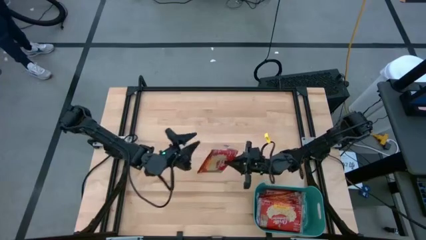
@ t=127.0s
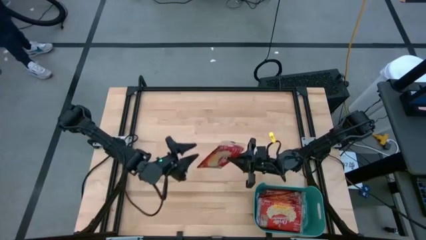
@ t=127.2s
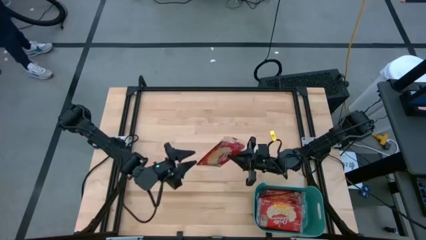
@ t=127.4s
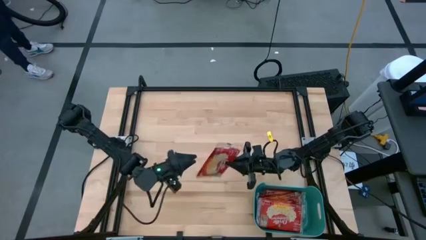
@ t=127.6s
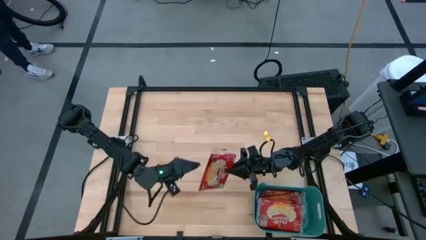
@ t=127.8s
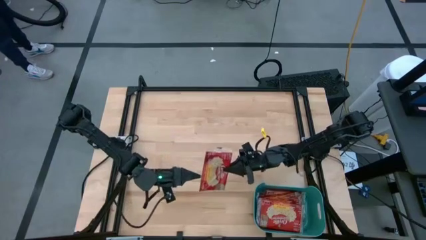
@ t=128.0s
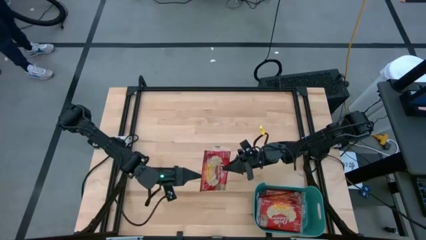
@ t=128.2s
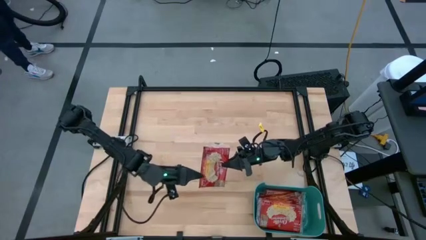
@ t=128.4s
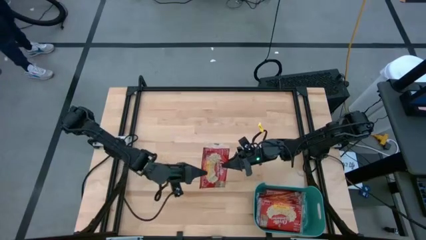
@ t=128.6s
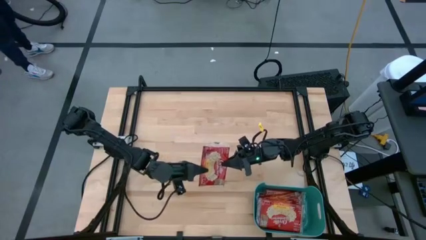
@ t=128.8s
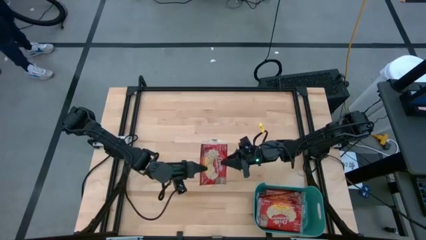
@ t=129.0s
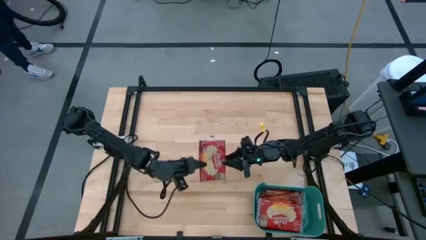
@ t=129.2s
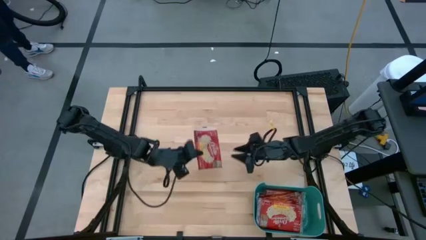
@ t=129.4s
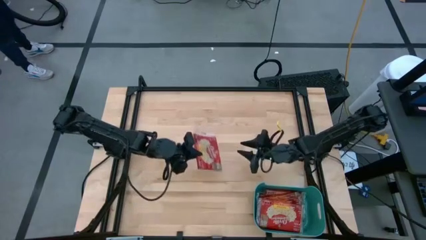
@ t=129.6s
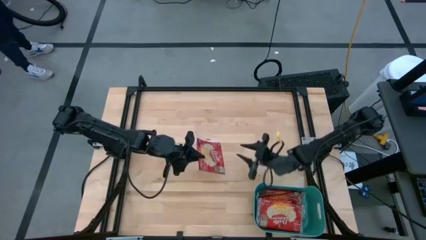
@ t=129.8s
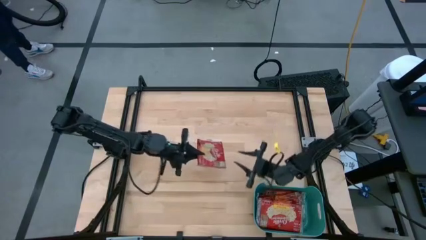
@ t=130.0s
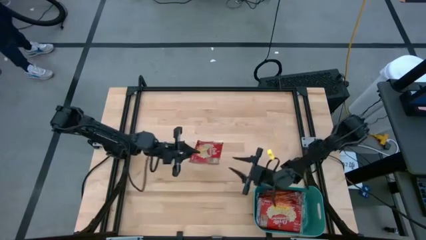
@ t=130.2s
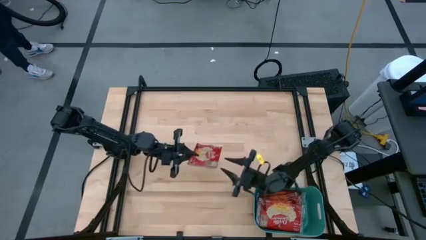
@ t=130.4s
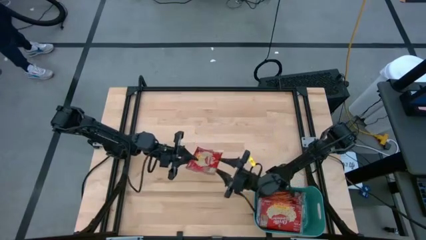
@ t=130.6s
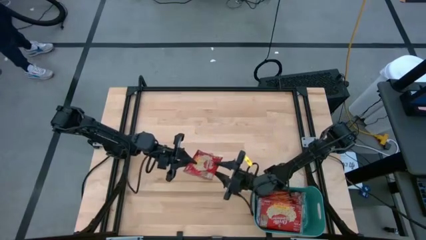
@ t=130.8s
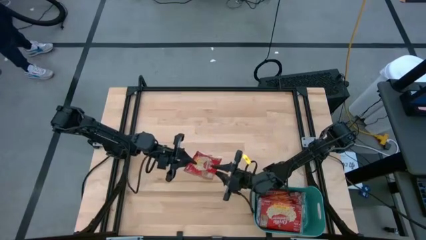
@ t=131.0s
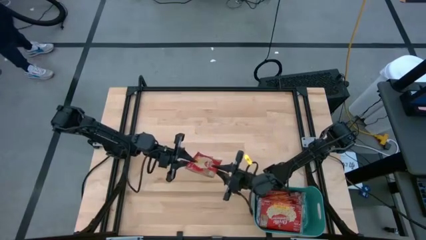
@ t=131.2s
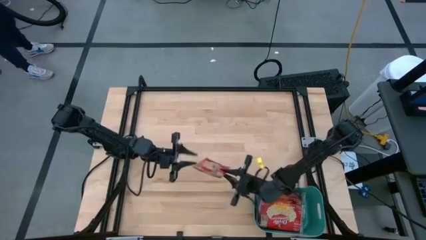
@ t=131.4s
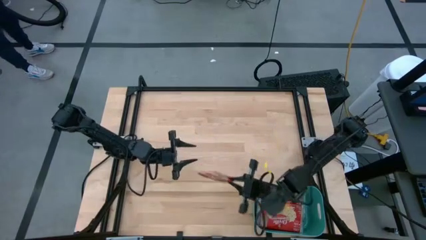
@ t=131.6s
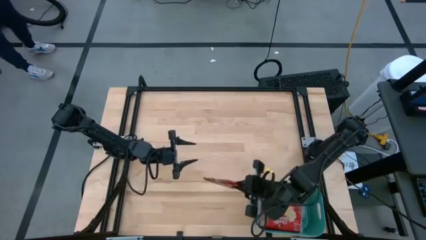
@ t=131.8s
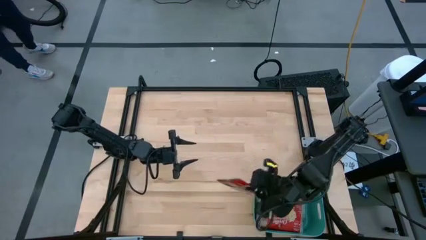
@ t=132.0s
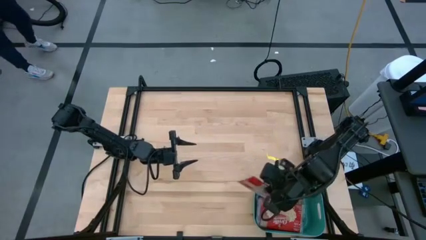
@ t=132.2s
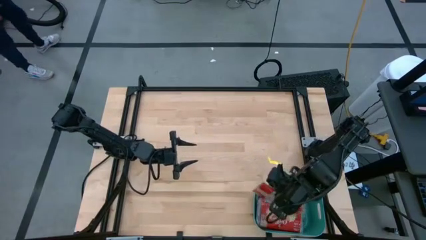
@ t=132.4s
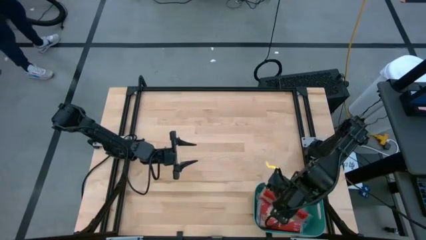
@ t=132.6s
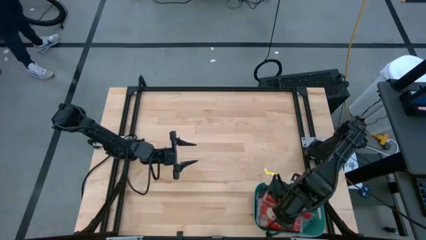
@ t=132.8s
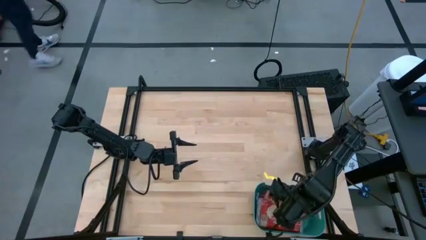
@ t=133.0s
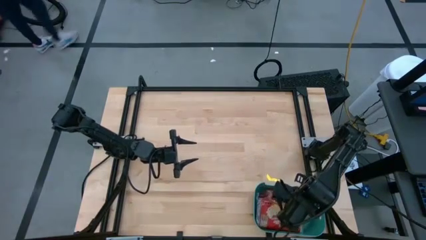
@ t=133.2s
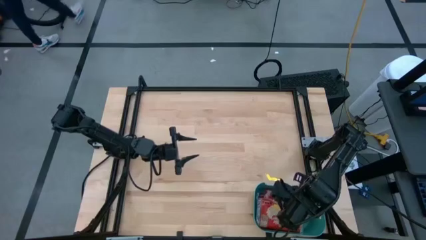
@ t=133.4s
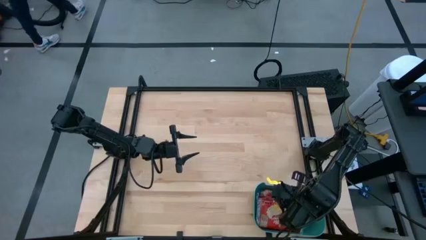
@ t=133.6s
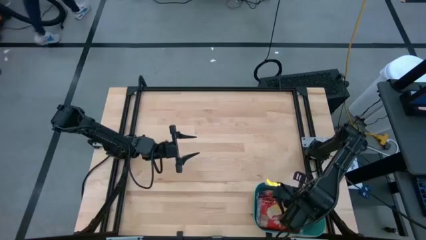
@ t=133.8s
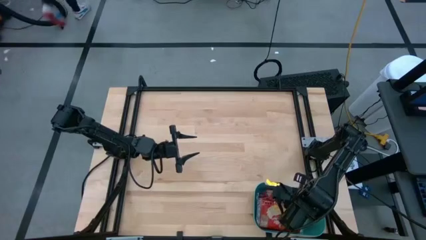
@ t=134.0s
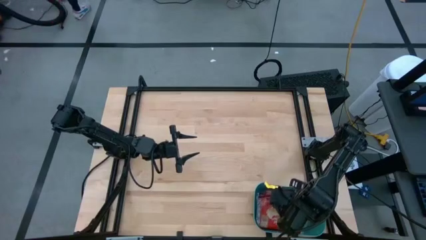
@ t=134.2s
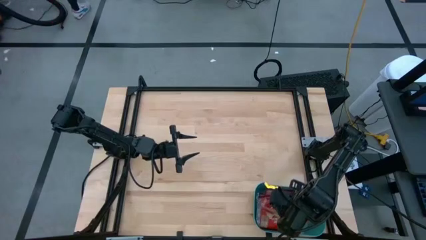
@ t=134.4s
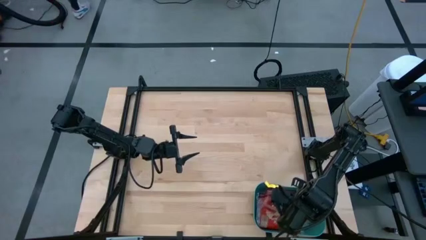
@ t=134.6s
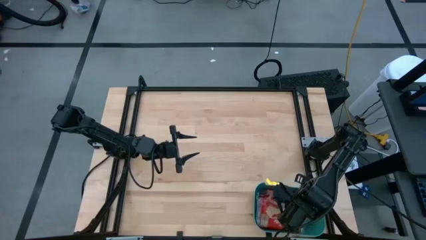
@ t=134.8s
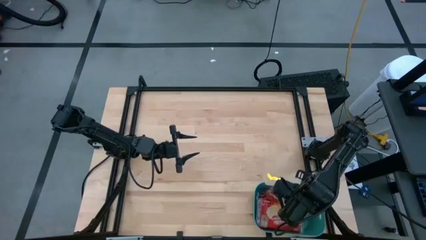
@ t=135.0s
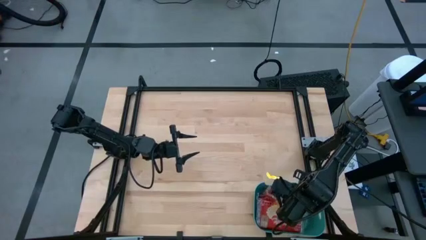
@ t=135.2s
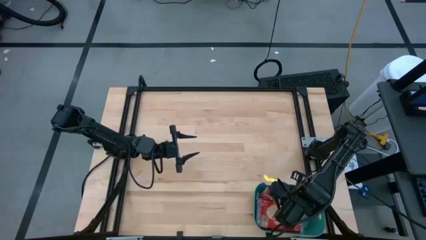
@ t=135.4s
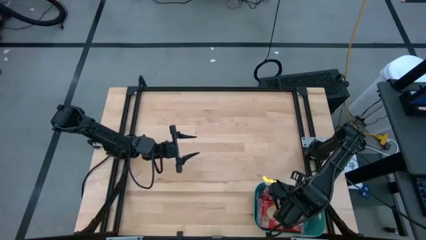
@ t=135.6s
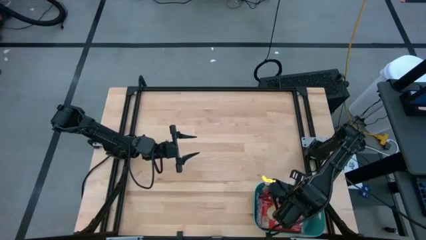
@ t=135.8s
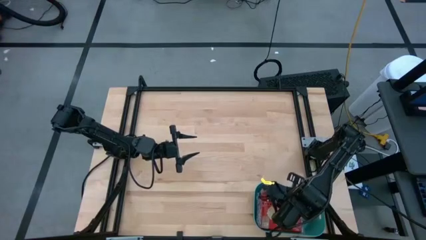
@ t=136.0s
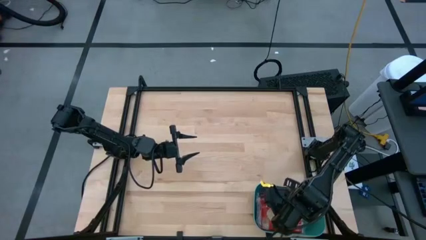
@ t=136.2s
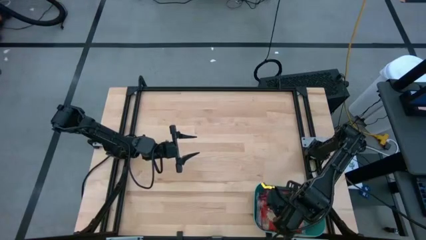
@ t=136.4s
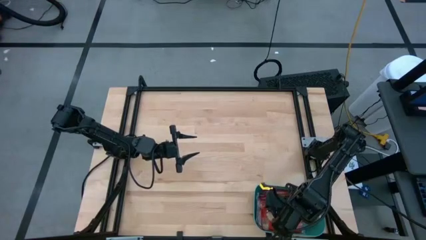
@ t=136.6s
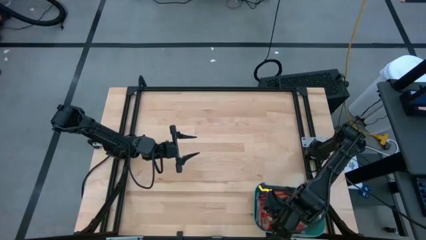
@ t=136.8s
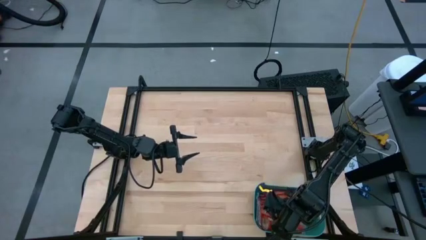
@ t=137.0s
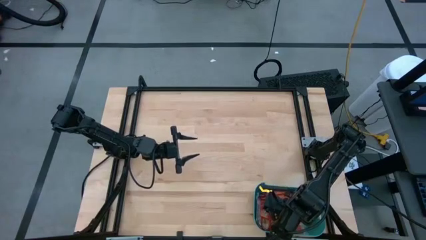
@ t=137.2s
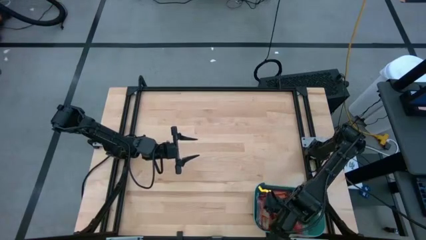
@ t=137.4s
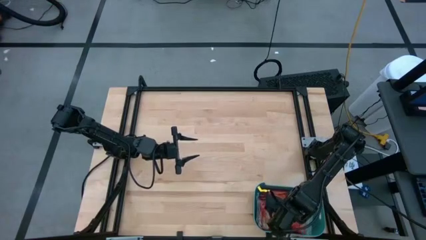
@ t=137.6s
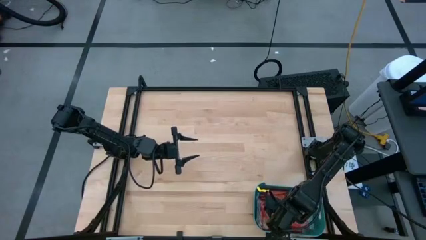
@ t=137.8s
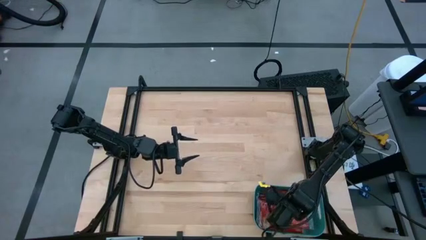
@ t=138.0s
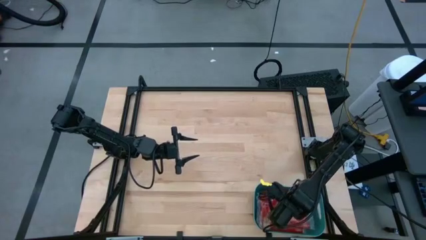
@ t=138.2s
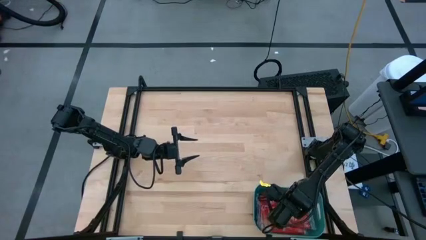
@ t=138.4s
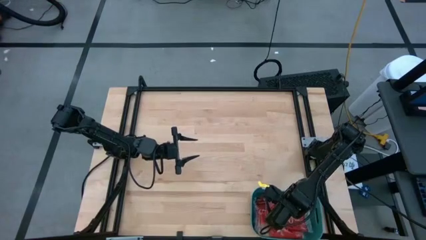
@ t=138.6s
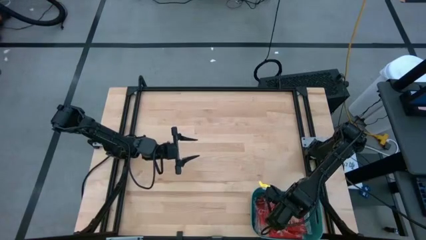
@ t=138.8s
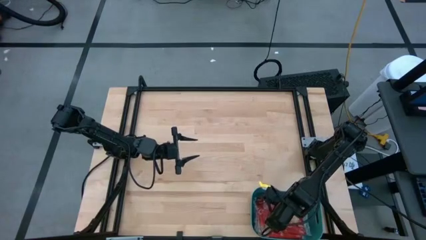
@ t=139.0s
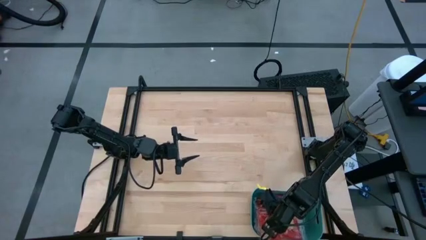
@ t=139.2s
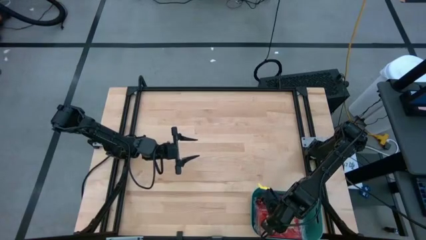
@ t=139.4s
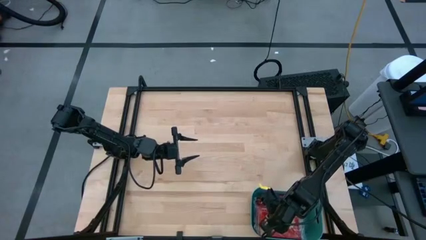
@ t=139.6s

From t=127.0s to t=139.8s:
Task: Sort popcorn bags into baskets
Put the popcorn bag into the green bin

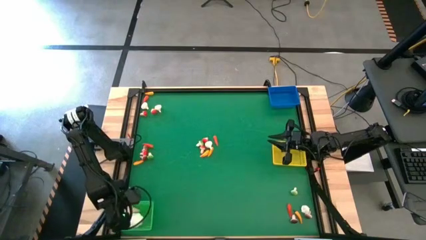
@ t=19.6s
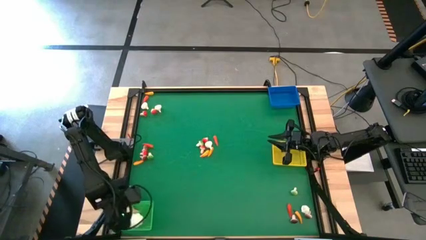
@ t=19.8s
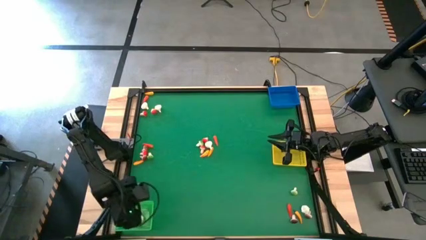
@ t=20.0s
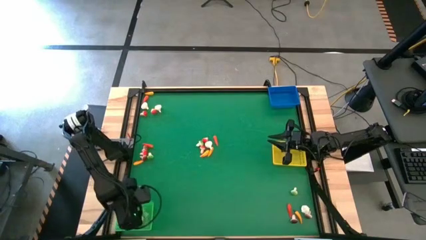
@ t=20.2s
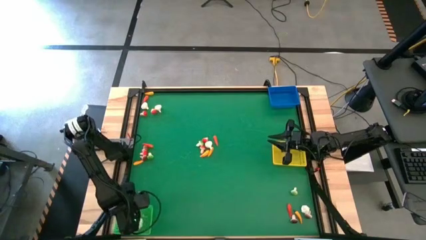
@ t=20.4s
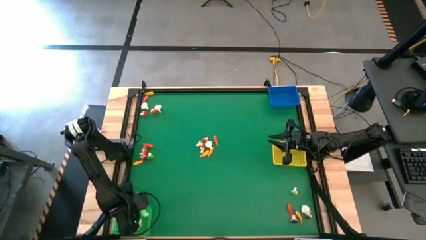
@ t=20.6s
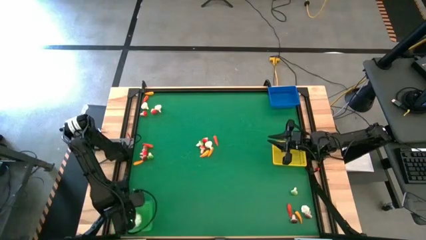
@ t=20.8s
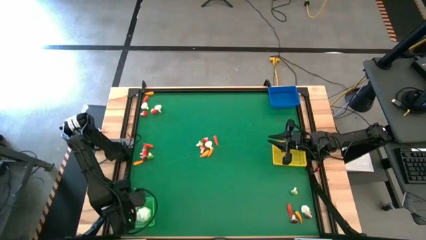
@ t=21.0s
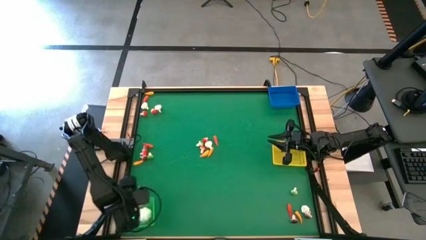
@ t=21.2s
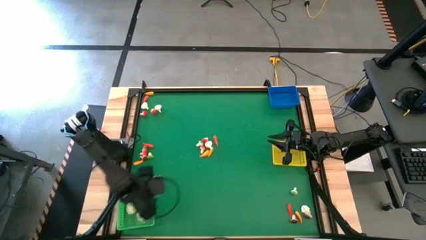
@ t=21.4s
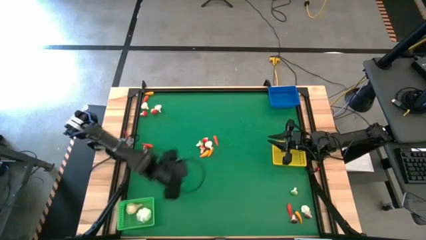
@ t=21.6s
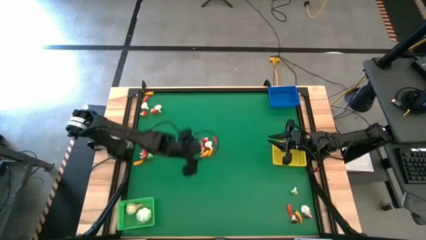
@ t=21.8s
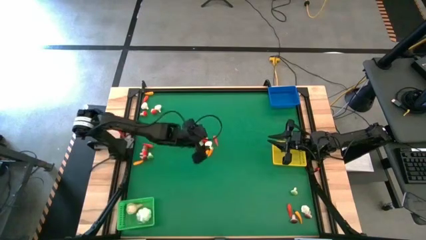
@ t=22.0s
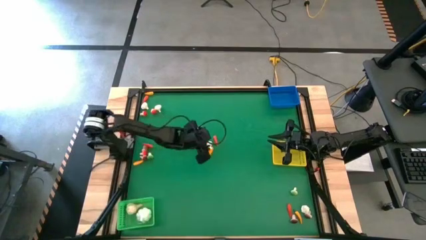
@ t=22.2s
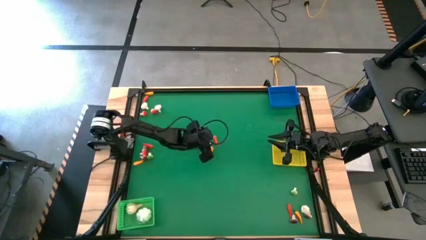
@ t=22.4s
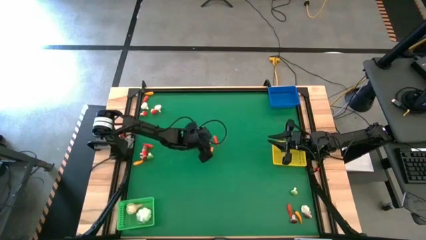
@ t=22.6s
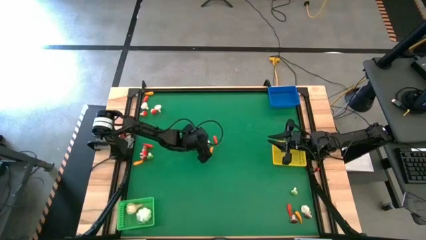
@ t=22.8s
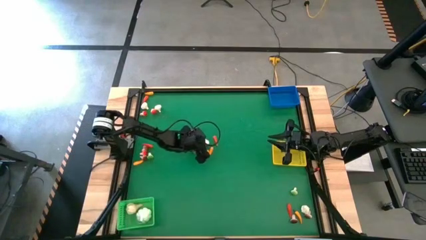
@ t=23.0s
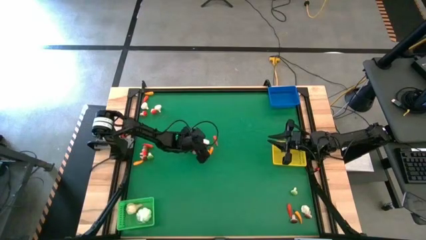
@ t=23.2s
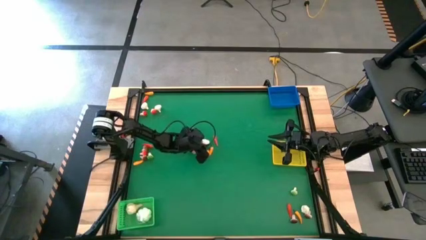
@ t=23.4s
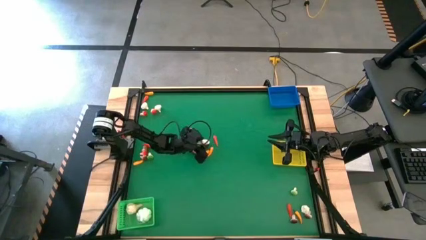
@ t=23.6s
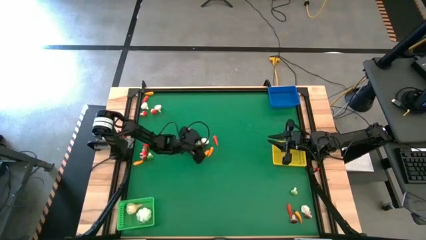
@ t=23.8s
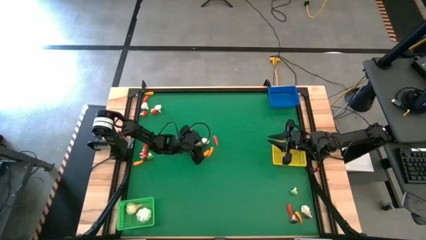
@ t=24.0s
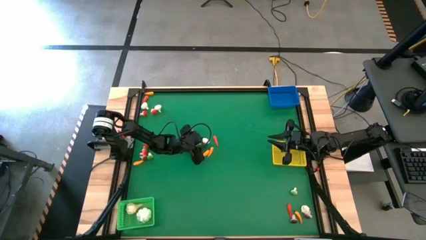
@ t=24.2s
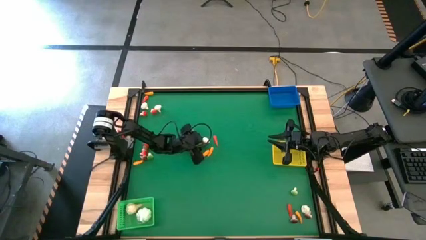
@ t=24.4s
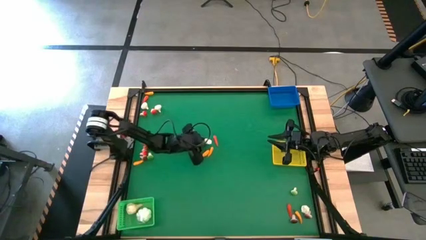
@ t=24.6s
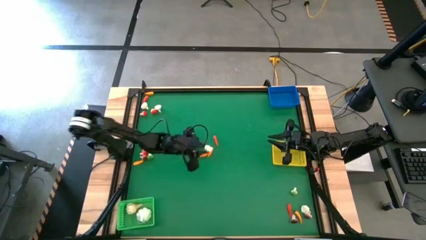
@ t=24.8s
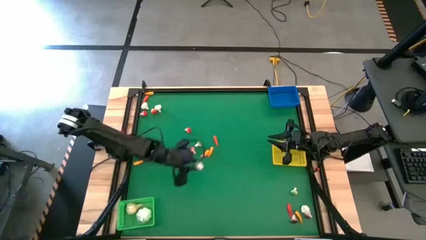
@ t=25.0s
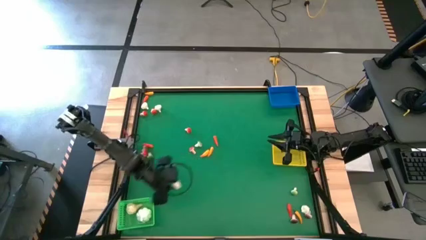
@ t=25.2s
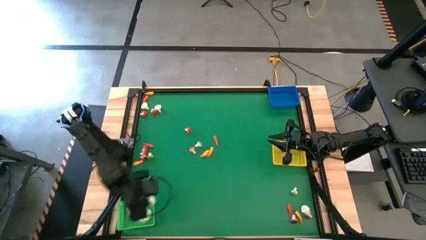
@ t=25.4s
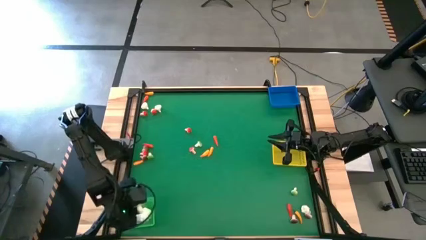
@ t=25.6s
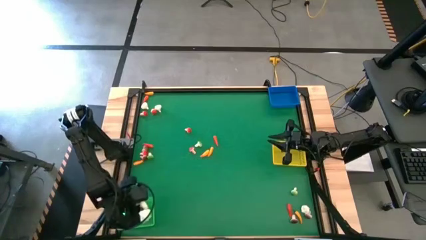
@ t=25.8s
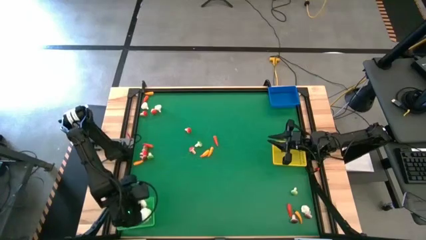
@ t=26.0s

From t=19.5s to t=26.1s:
Task: Sort produce into baskets
Put the white garlic into the green bin
